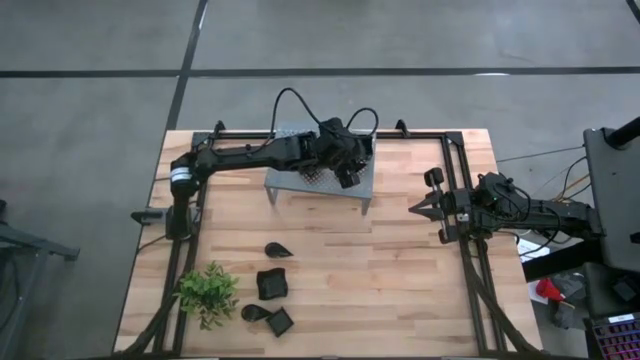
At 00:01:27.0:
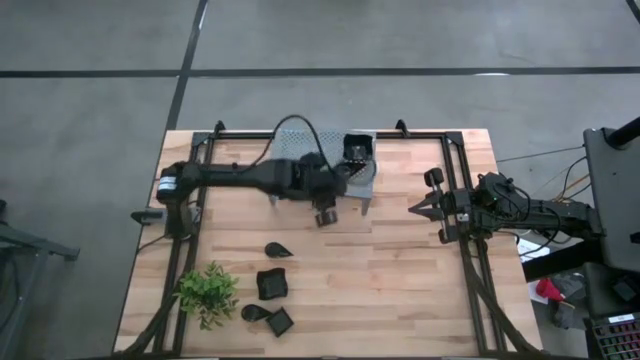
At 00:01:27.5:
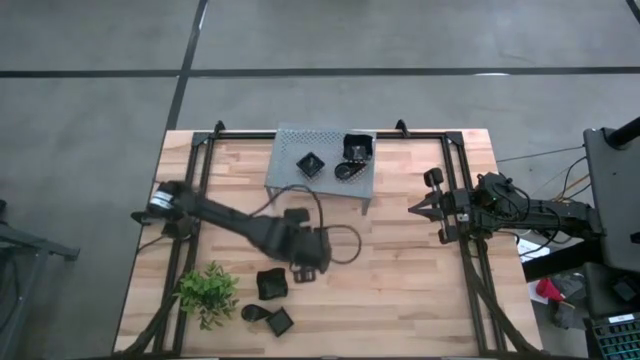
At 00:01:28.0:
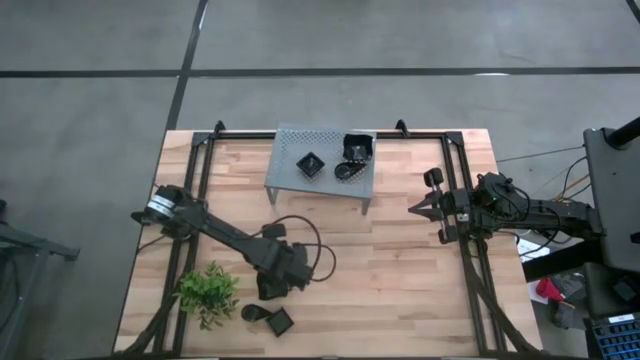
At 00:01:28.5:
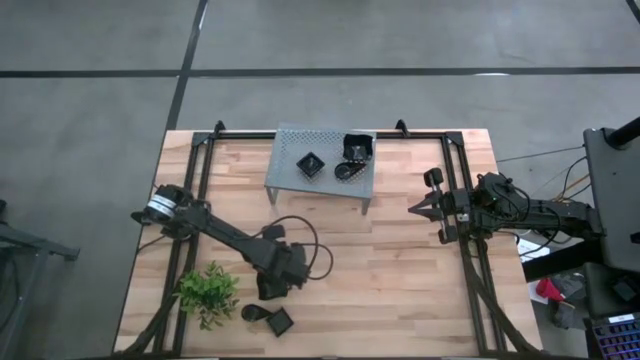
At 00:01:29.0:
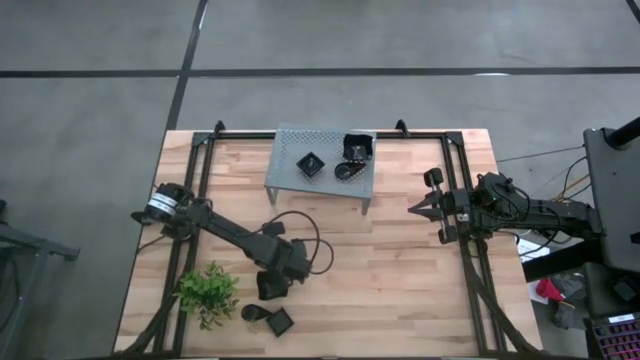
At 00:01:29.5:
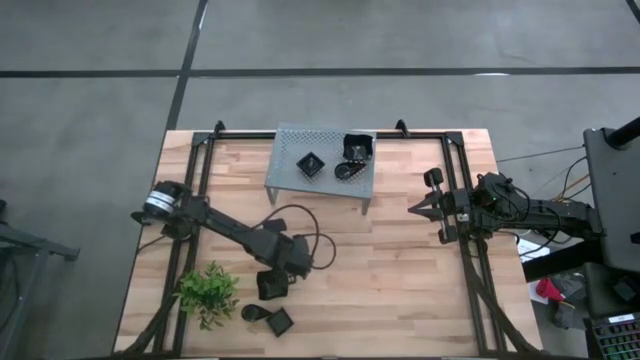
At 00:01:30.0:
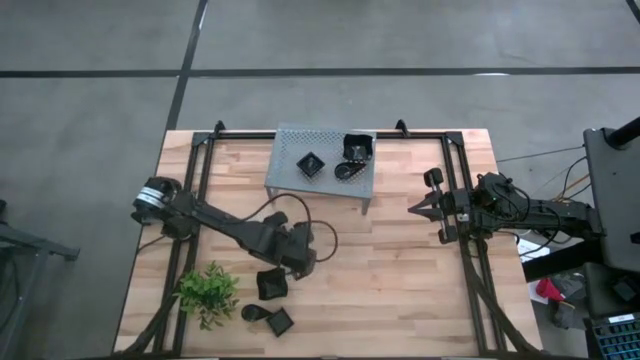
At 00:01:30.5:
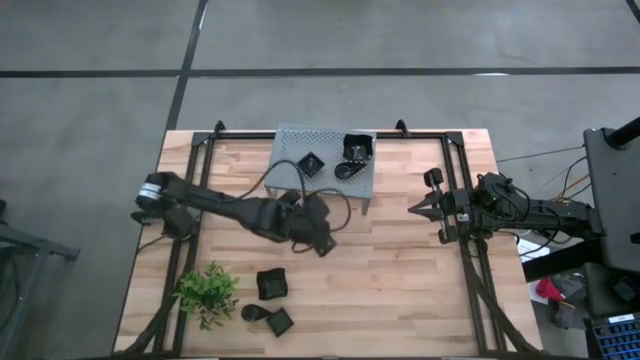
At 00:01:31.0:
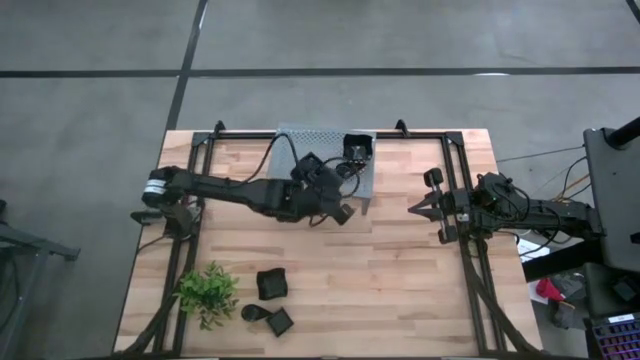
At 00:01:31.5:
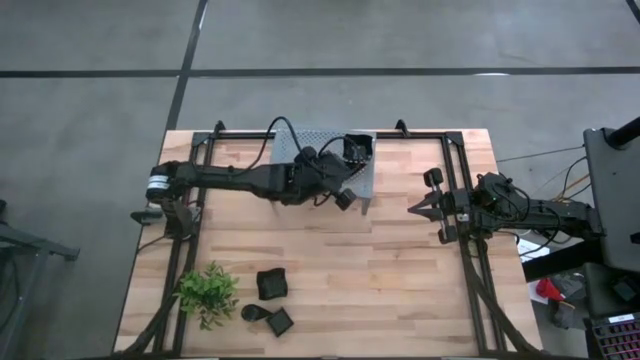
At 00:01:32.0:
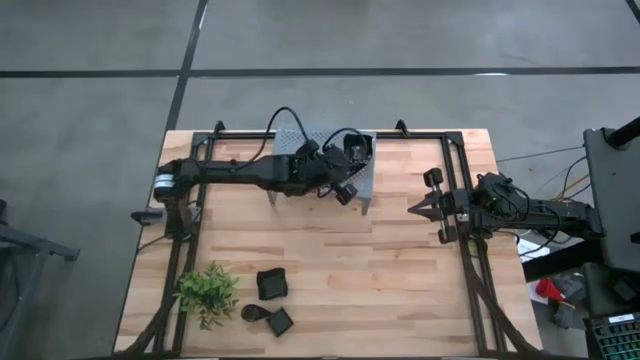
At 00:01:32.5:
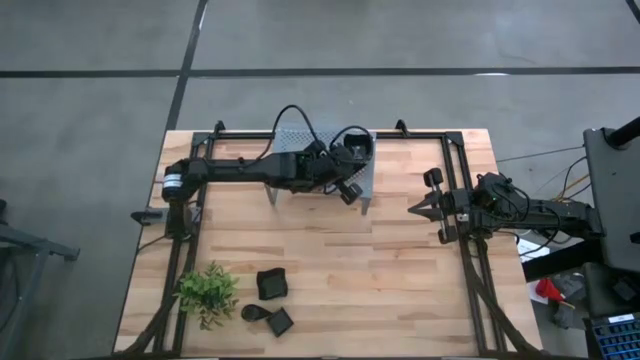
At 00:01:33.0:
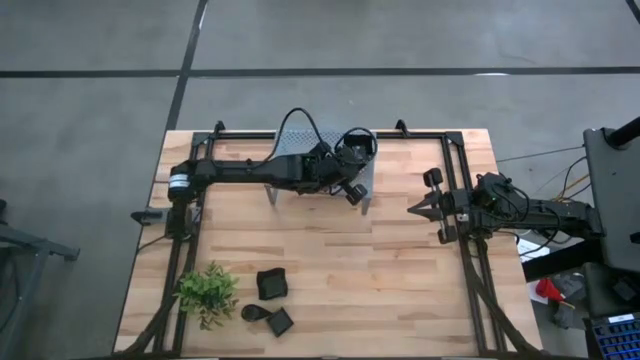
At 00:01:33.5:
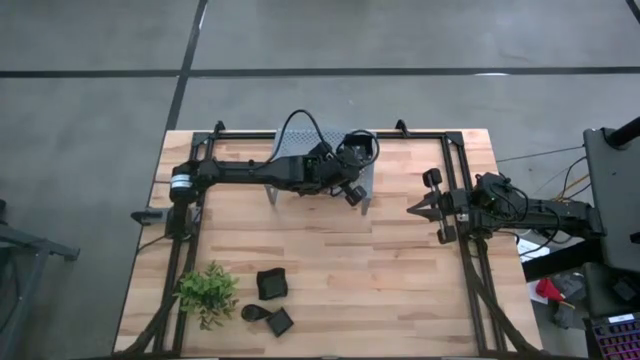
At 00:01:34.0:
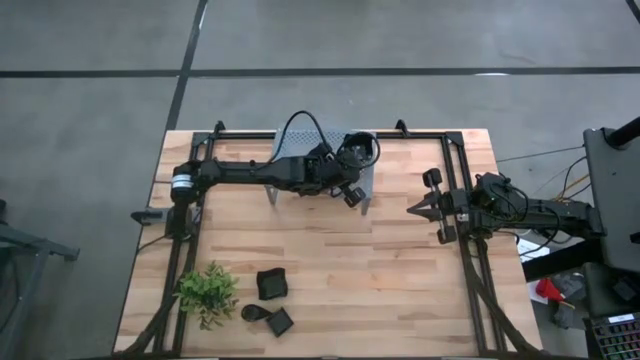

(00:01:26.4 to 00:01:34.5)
Task: Pick & Place Mini shaped plates
Stack the black drop shaped plate on top of the other black drop shaped plate on the shelf

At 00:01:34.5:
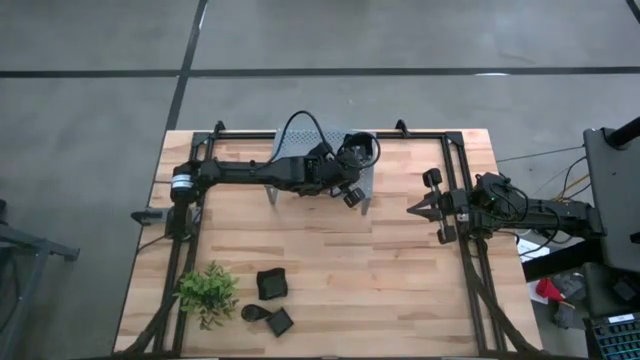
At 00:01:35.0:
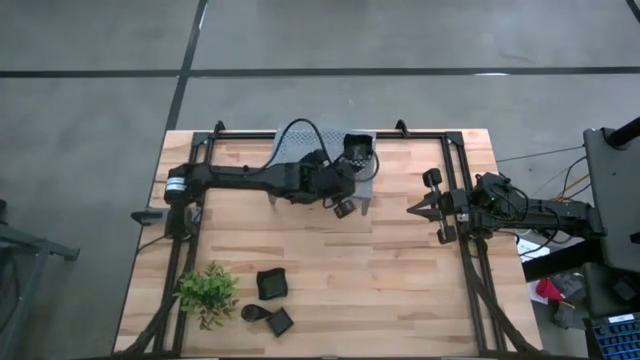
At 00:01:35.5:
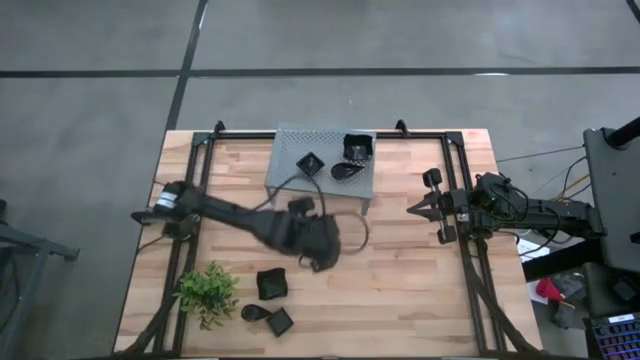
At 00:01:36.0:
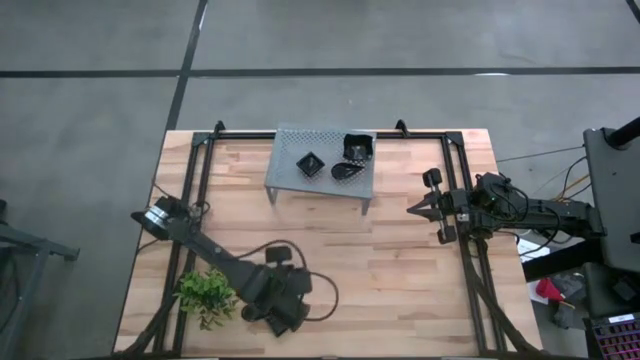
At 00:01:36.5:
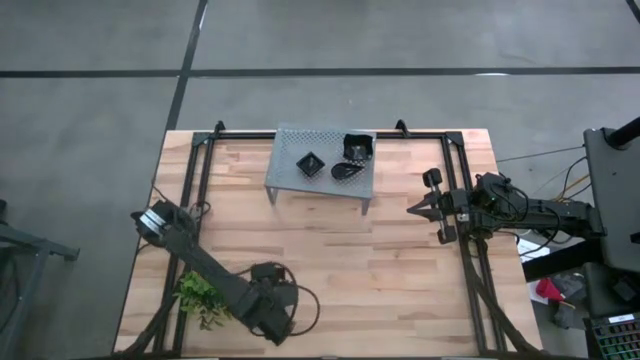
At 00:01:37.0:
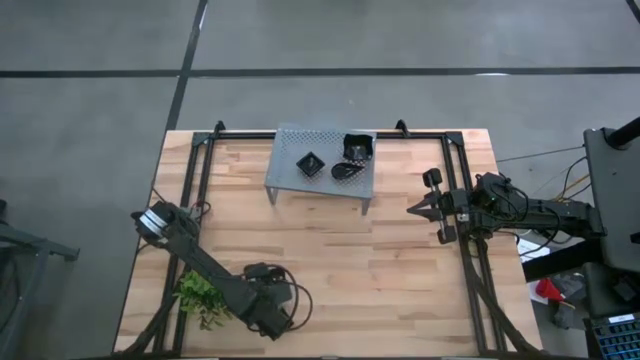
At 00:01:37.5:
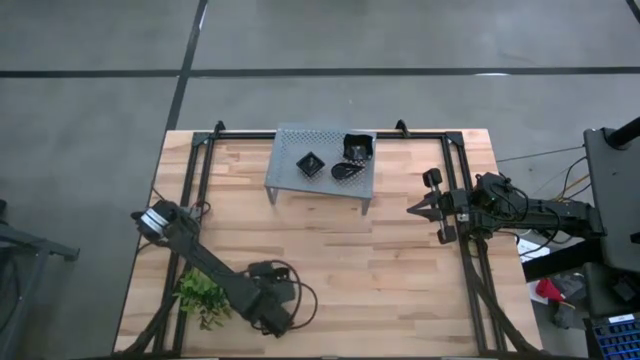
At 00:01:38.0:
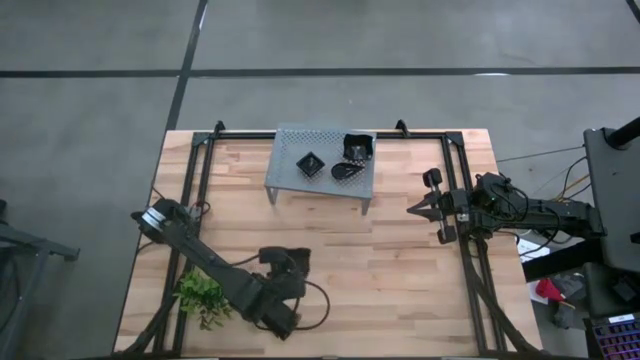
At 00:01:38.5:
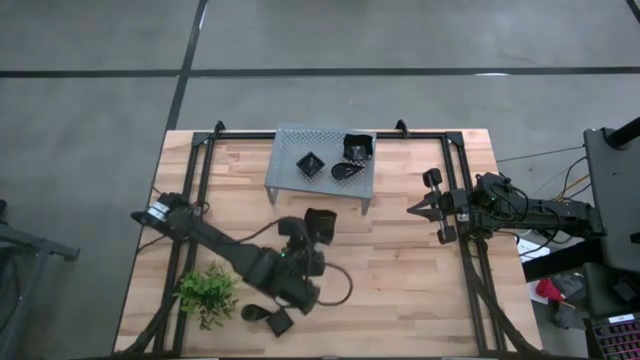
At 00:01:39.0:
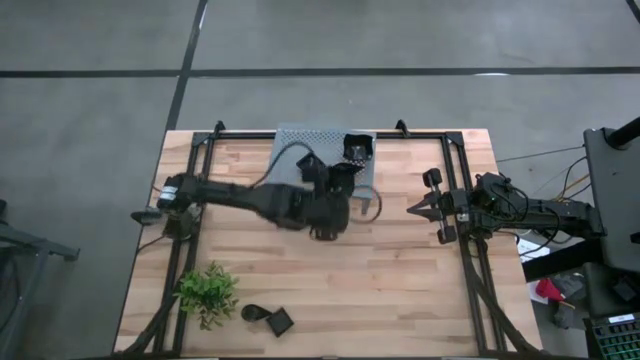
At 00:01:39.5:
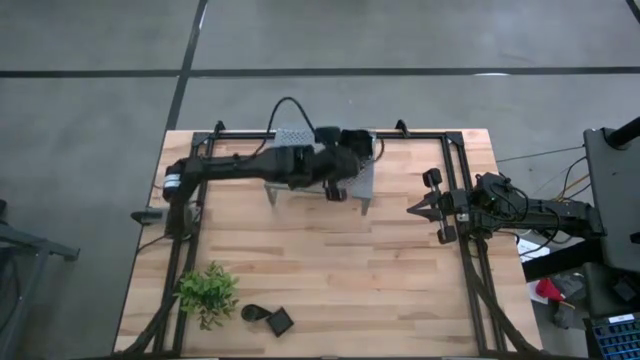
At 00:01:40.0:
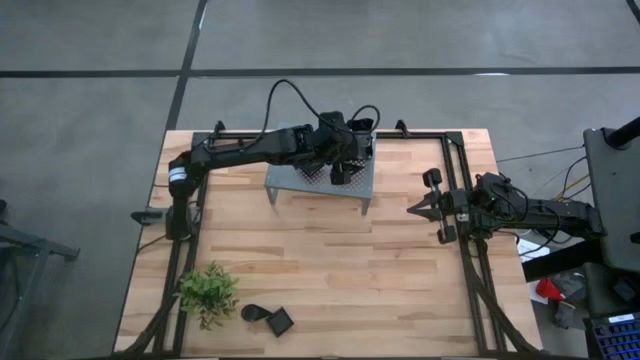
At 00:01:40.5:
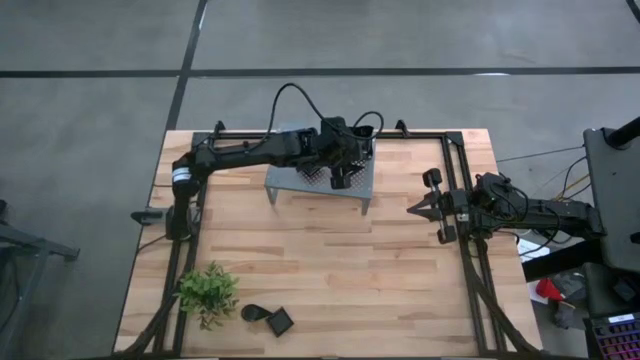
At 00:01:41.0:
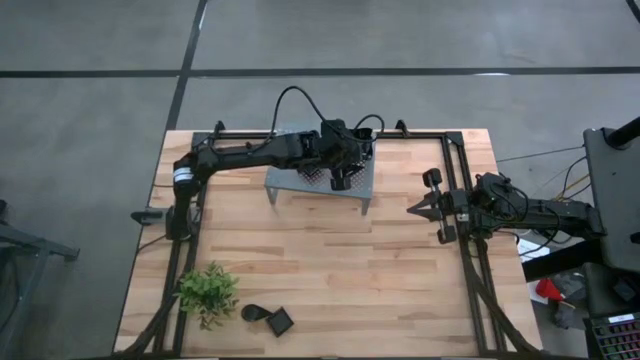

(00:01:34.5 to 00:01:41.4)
Stack the black distorted square plate on top of the other black distorted square plate on the shelf

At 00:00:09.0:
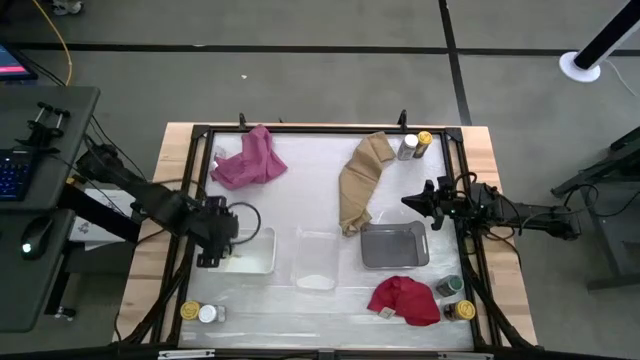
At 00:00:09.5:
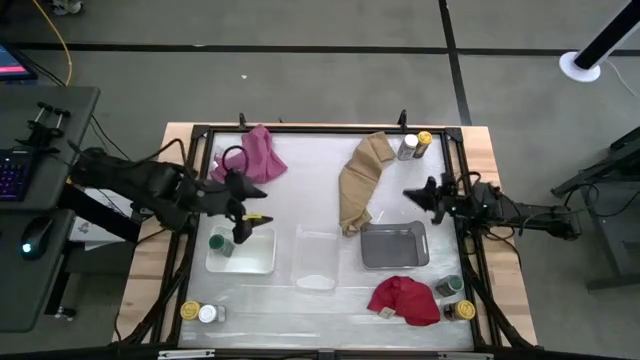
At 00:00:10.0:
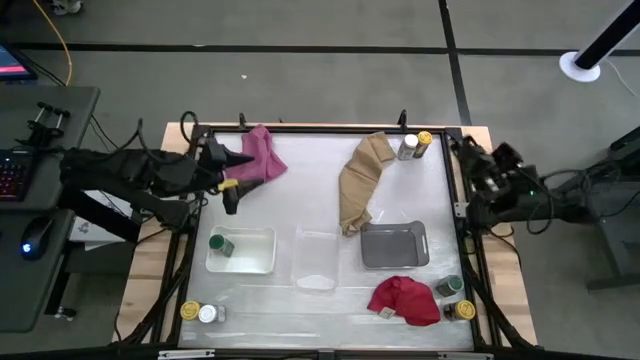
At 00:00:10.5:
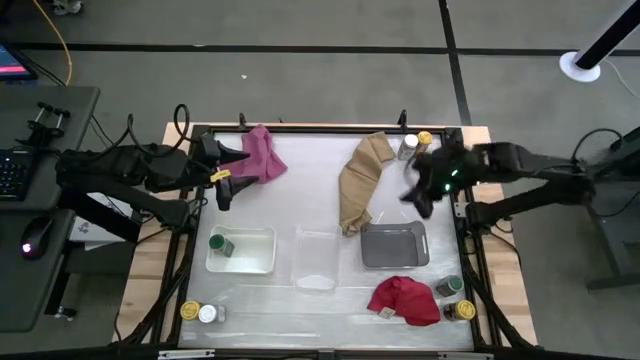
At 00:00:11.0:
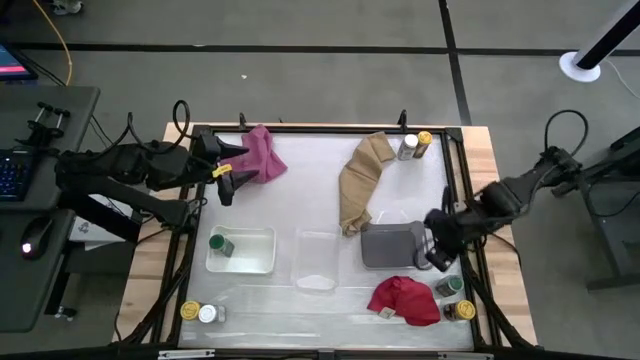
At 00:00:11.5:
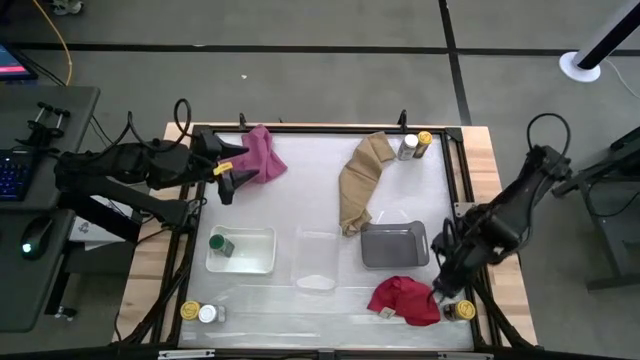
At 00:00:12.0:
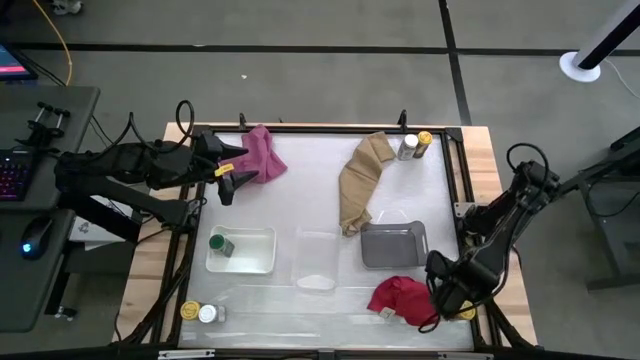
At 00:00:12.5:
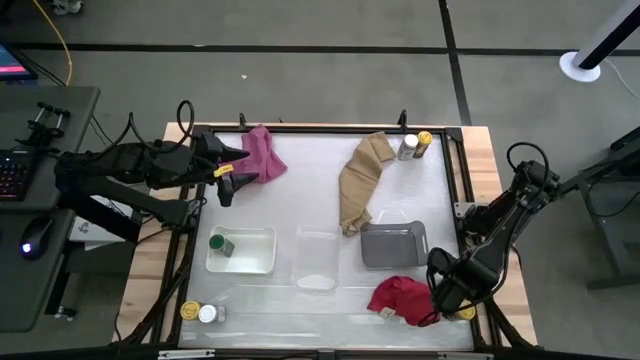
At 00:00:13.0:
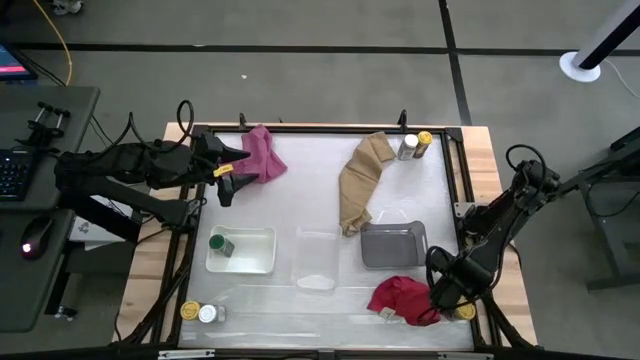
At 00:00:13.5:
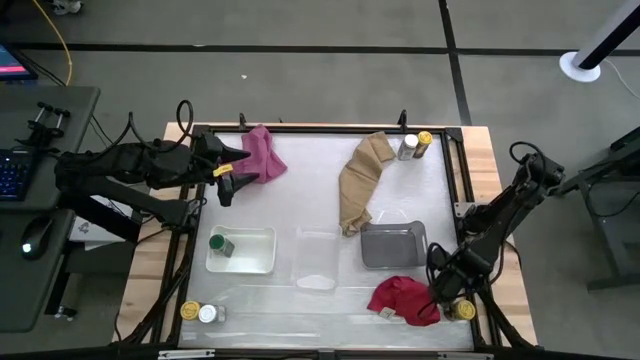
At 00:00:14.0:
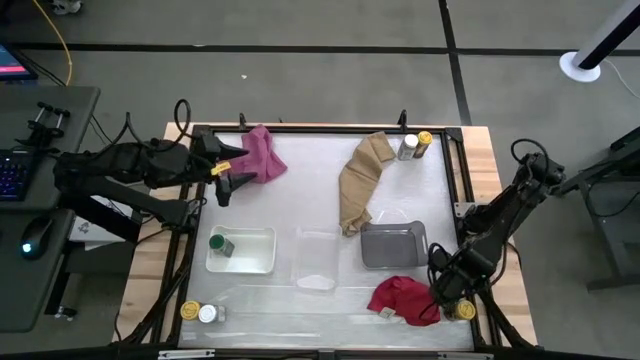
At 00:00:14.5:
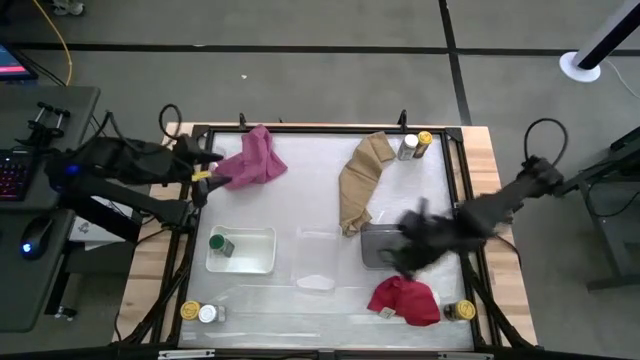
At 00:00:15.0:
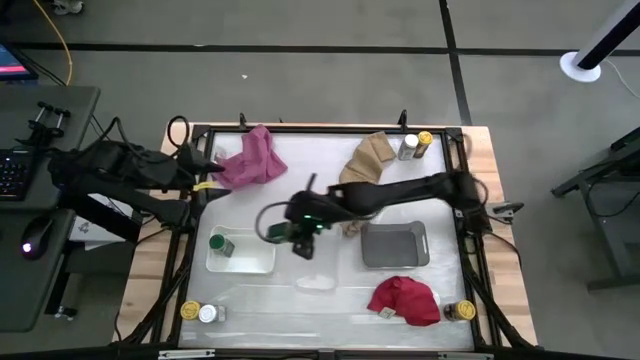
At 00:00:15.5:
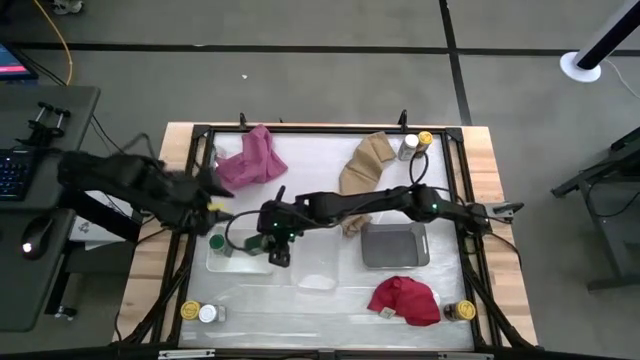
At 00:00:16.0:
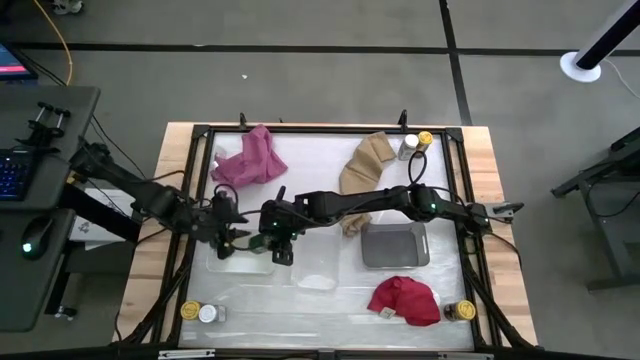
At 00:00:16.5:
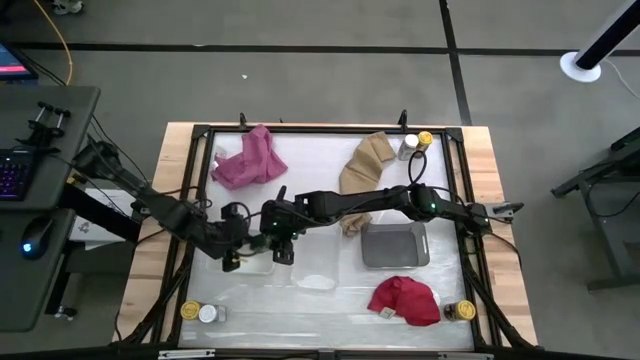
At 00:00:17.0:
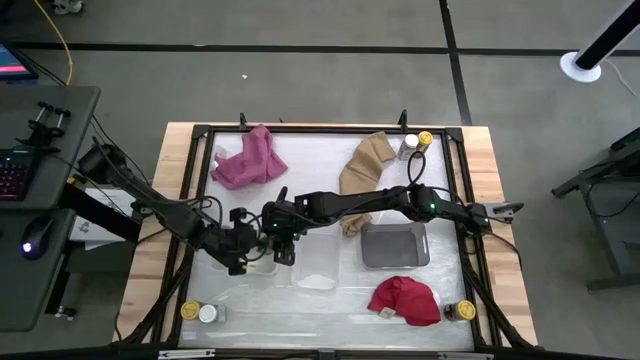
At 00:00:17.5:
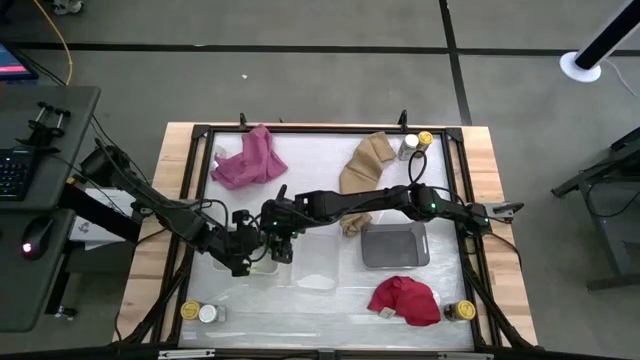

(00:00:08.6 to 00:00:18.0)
Task: Sort spices by type
Put the green seasoning bottle into the white bin
